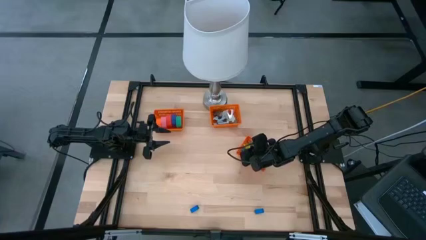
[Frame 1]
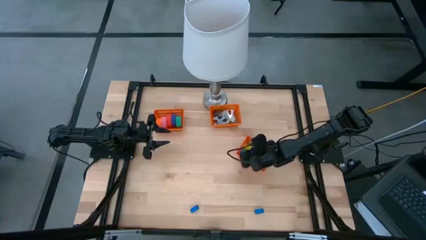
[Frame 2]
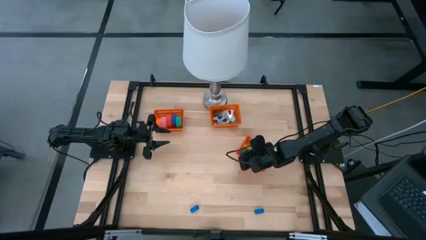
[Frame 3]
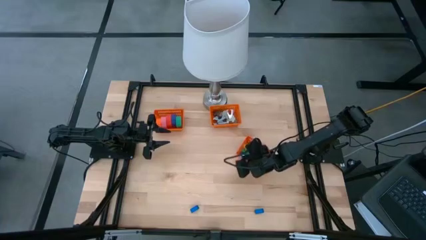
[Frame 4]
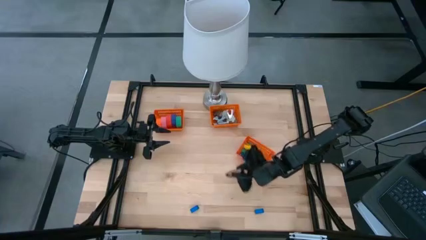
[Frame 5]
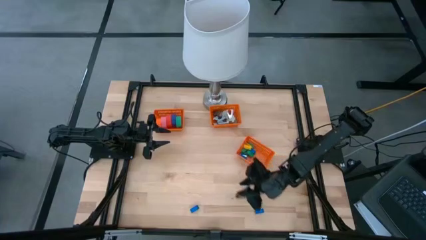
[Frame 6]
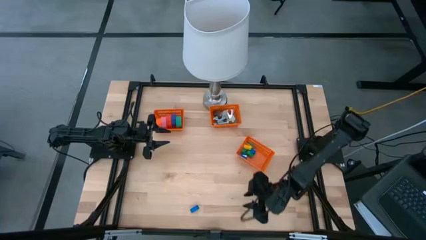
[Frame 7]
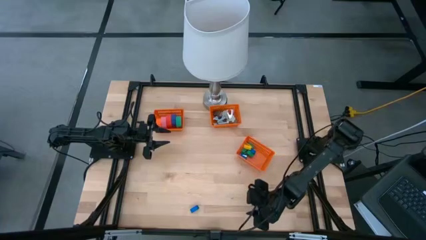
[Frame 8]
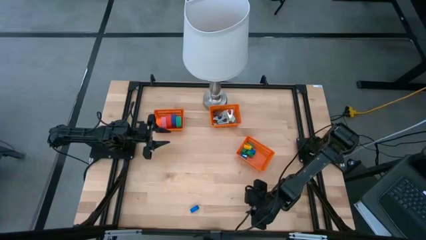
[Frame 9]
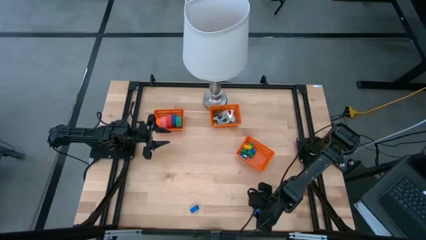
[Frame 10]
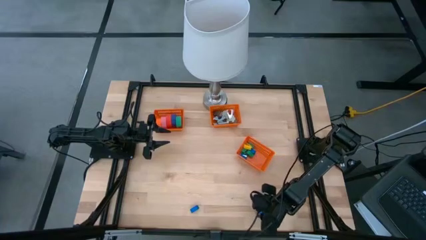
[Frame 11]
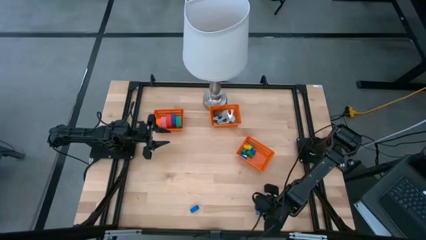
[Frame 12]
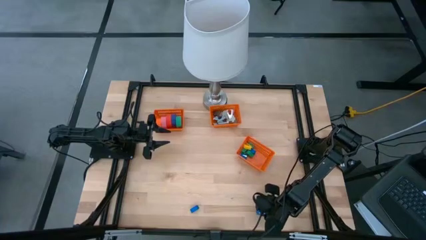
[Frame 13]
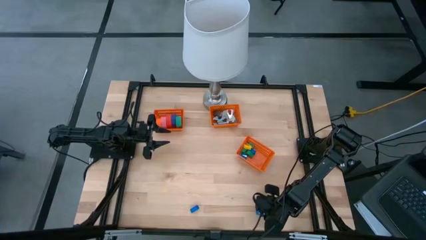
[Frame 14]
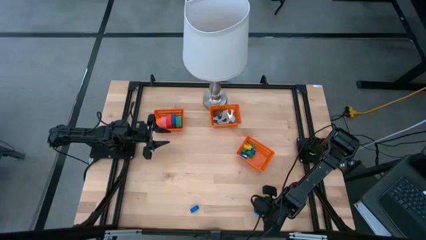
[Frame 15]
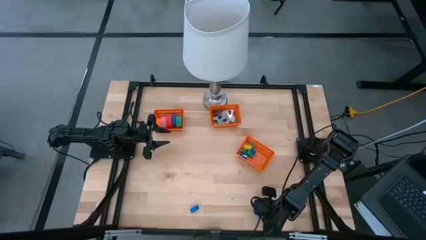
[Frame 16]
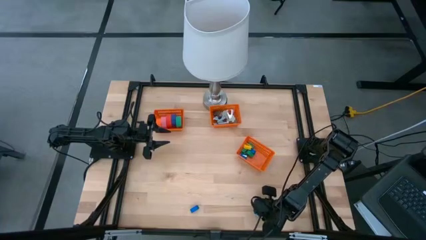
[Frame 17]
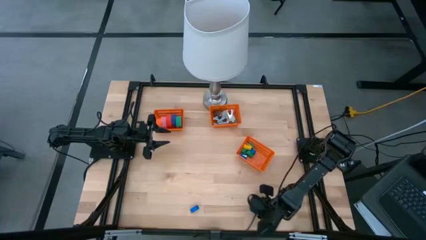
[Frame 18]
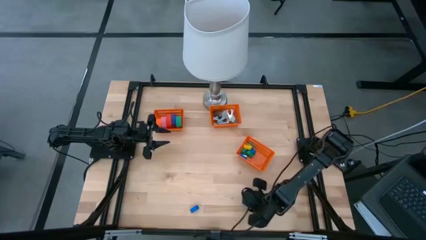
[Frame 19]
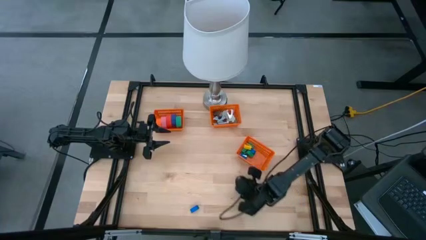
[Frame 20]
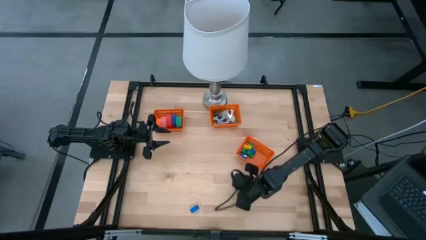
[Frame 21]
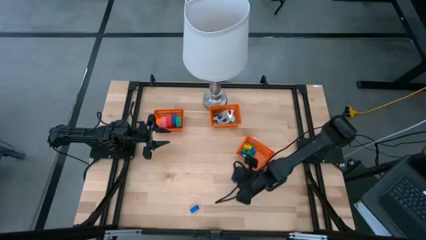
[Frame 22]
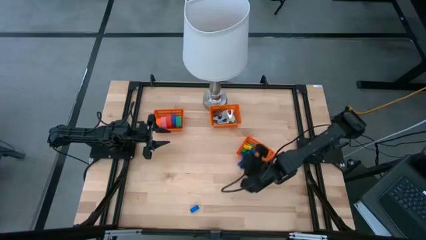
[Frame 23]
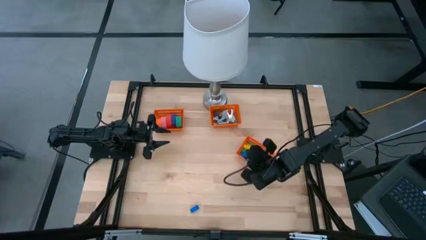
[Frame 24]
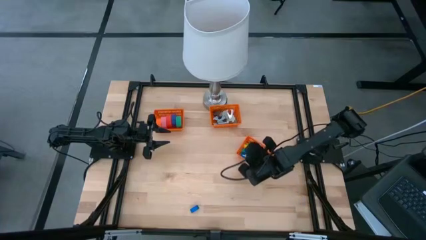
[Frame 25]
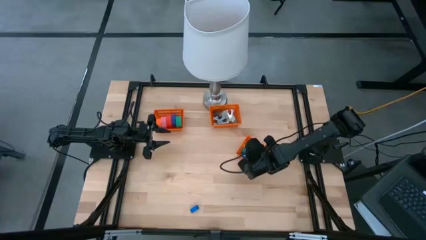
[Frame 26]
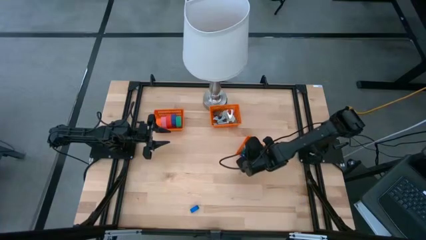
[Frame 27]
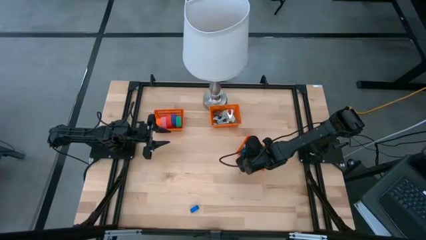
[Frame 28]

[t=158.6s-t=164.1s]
Task: Pick and place Stapler, Stapler remover, tape
Put the blue stapler into the bottom orange bin

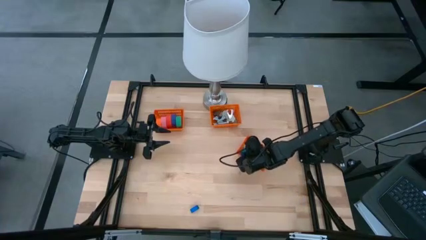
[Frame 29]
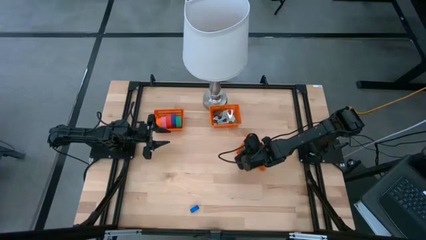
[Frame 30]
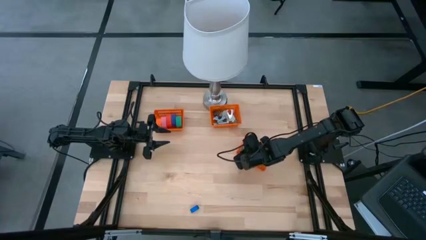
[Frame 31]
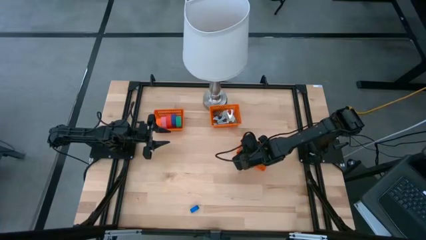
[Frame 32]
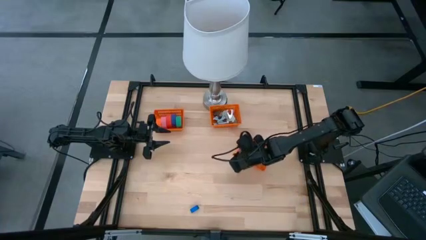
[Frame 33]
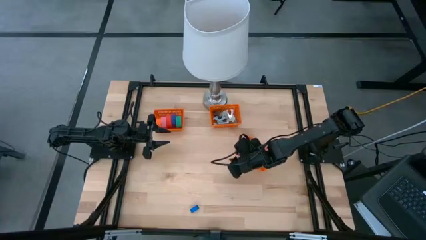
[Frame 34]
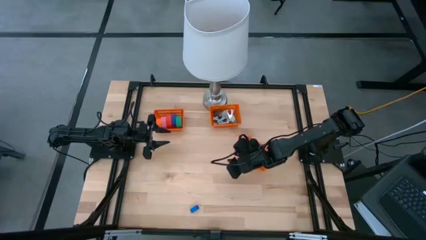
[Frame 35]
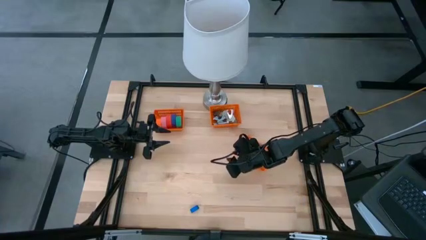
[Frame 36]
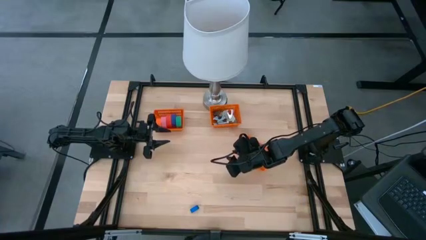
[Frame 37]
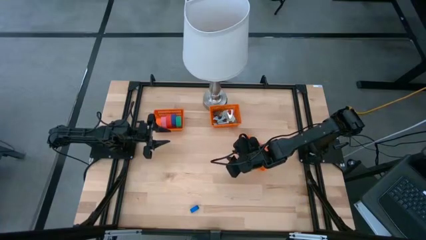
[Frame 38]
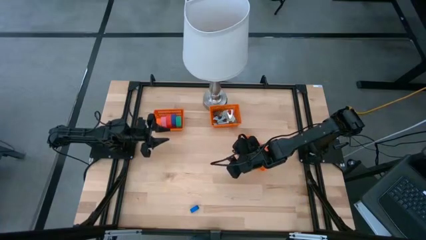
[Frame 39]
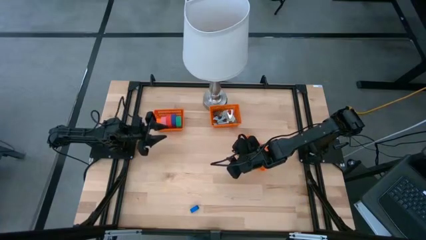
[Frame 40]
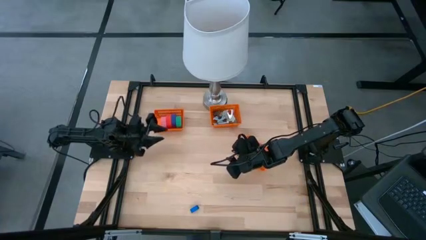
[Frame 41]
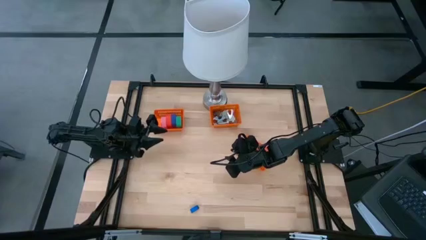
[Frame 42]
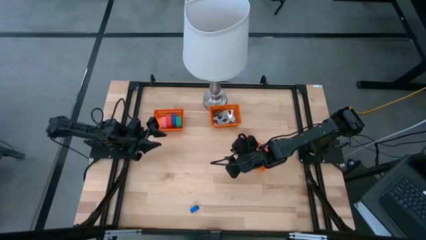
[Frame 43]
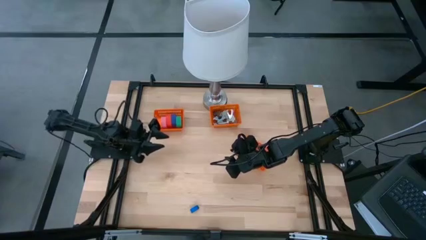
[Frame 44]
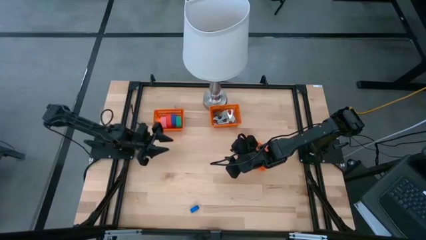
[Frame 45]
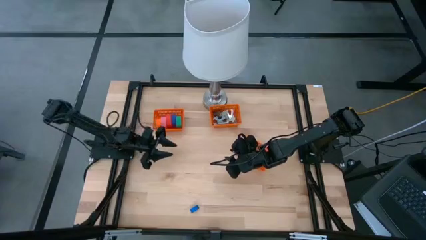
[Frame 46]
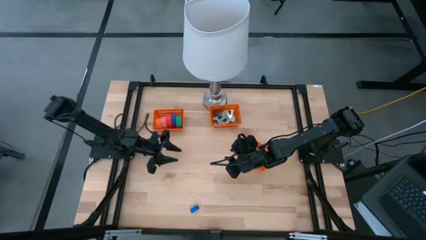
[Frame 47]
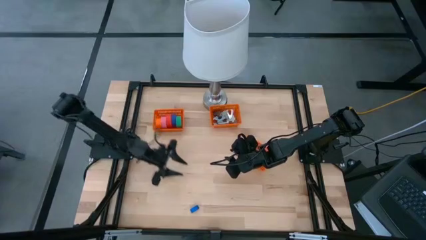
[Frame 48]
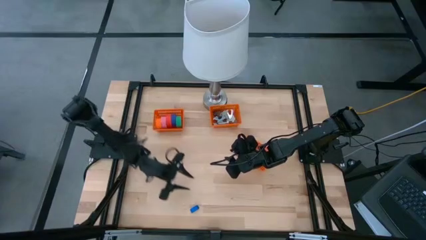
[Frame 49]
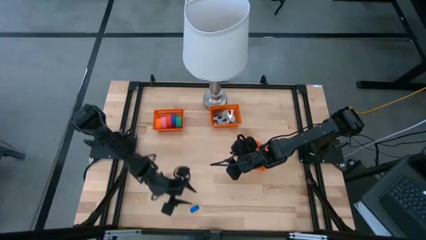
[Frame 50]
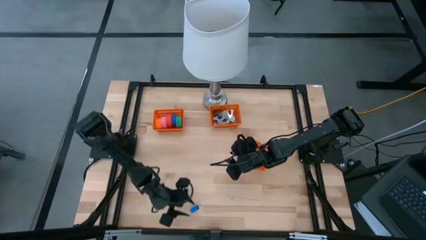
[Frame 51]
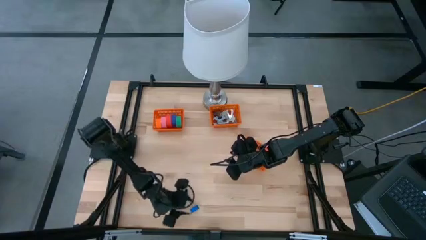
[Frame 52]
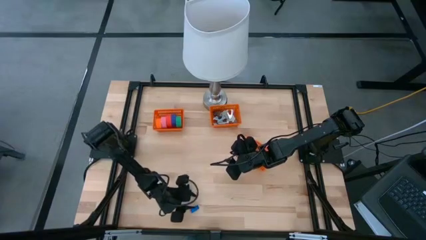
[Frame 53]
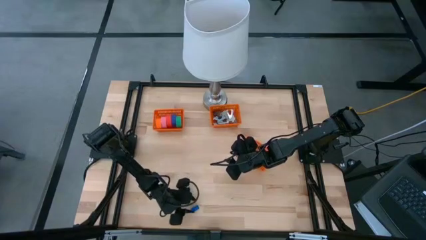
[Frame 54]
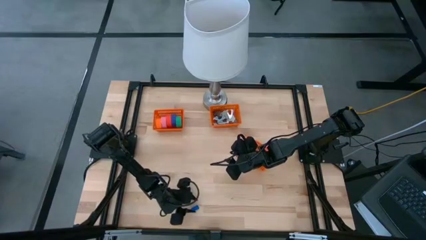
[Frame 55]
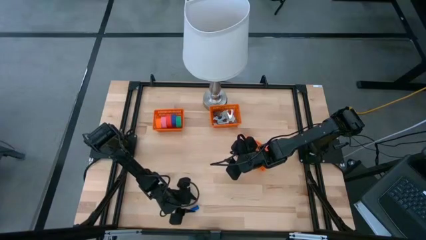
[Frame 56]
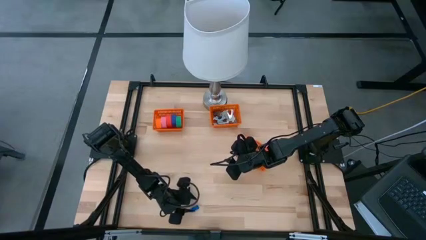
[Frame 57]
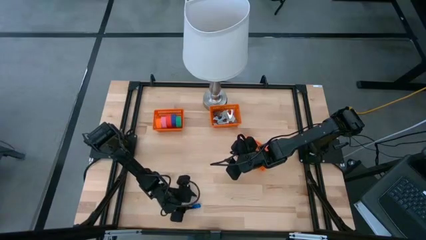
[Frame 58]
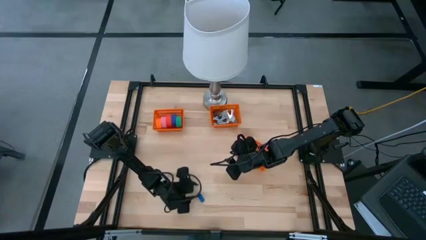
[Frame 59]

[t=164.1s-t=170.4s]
Put the blue stapler into the bottom orange bin

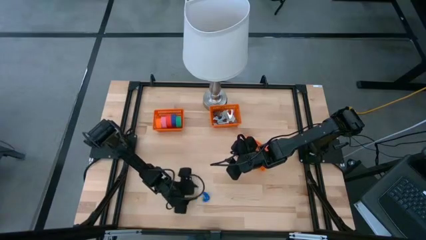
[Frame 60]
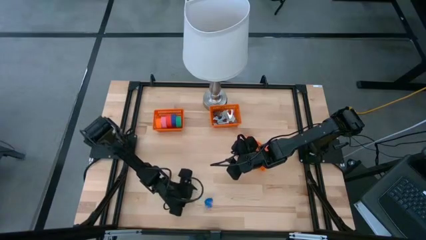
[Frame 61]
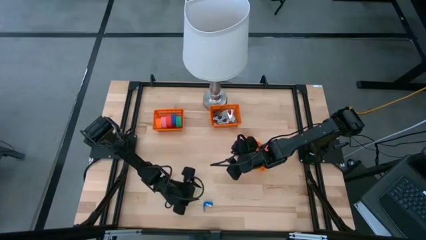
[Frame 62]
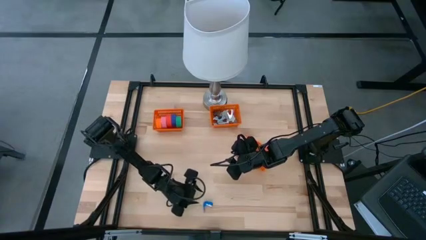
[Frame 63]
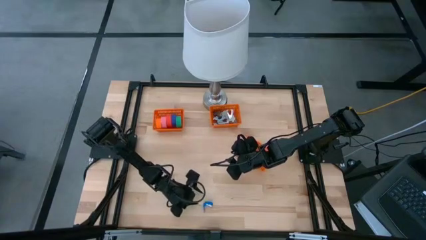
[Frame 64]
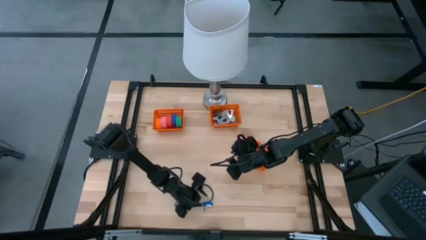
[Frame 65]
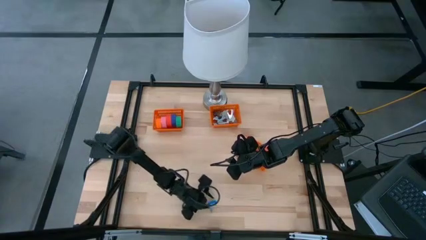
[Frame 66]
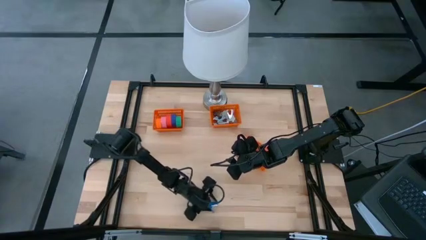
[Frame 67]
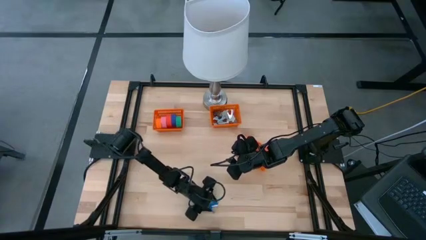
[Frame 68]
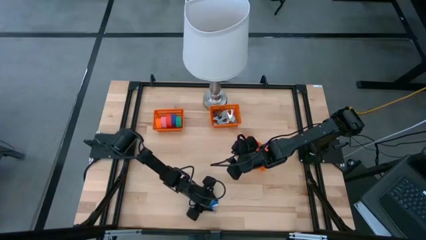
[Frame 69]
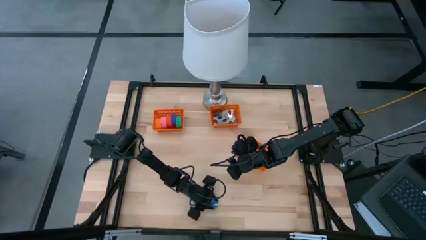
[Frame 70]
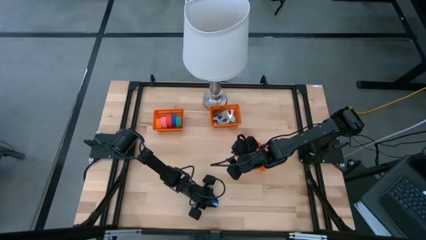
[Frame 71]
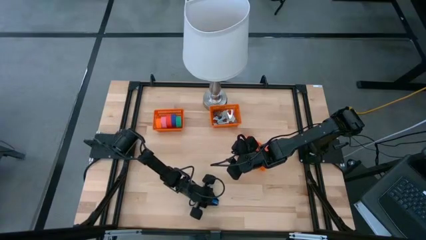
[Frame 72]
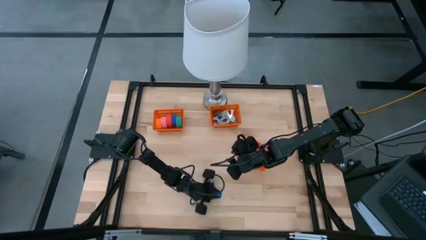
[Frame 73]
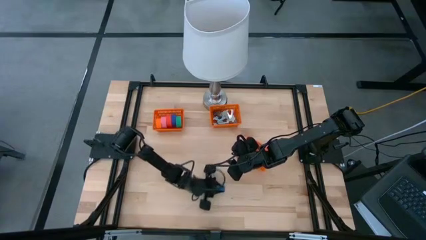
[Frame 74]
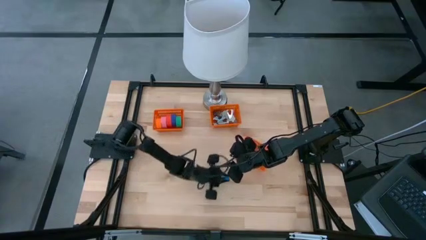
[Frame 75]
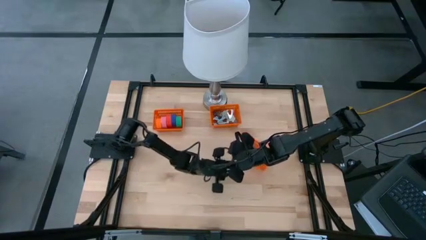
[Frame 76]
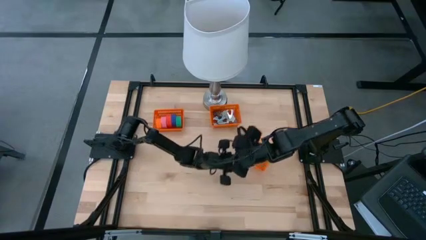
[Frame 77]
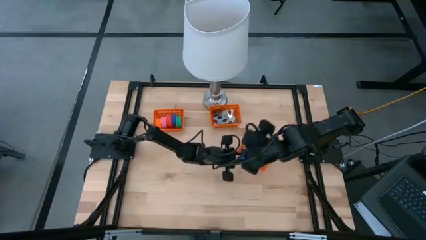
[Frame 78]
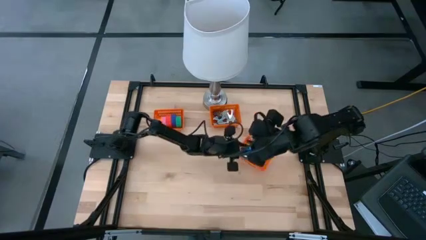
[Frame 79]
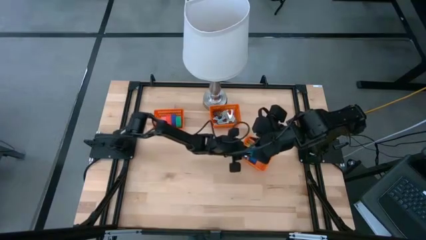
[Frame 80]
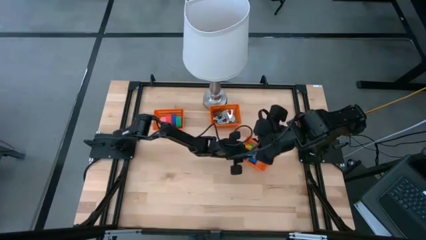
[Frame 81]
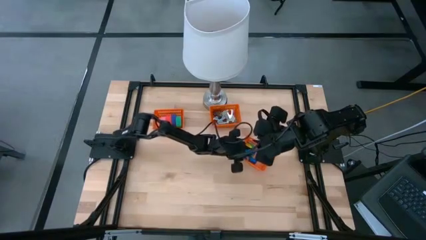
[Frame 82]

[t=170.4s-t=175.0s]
Put the blue stapler into the bottom orange bin
